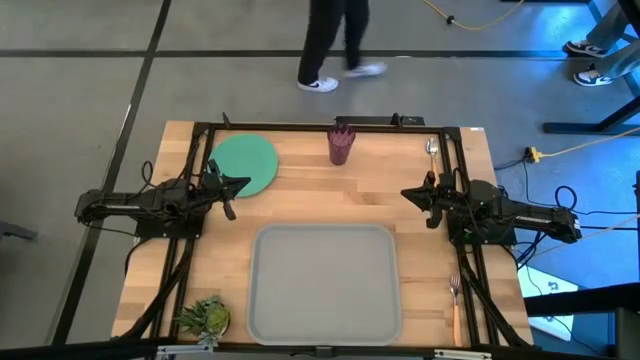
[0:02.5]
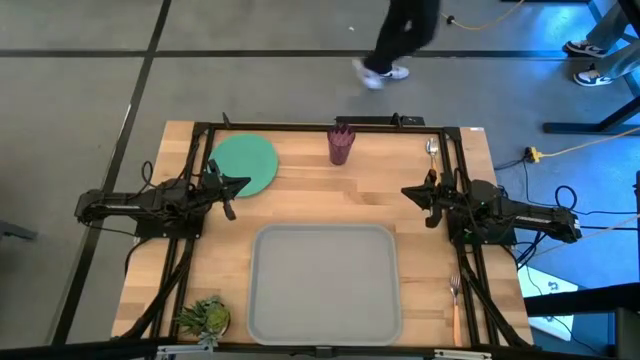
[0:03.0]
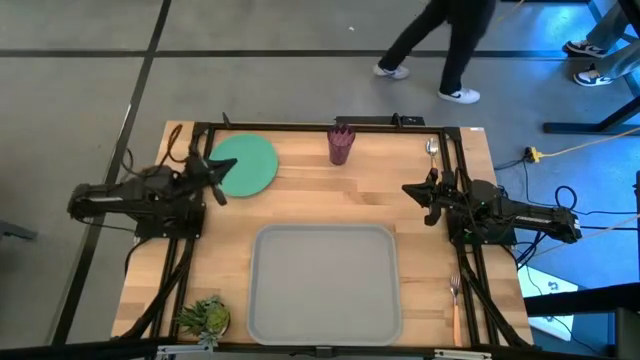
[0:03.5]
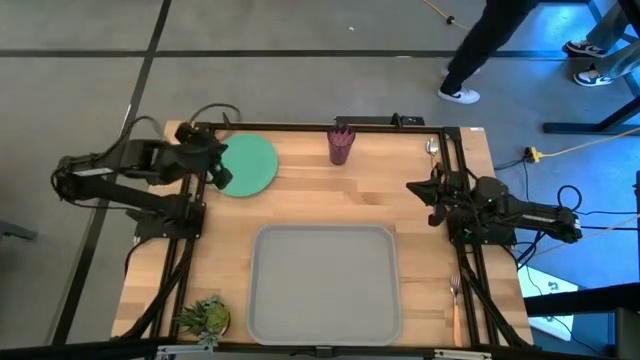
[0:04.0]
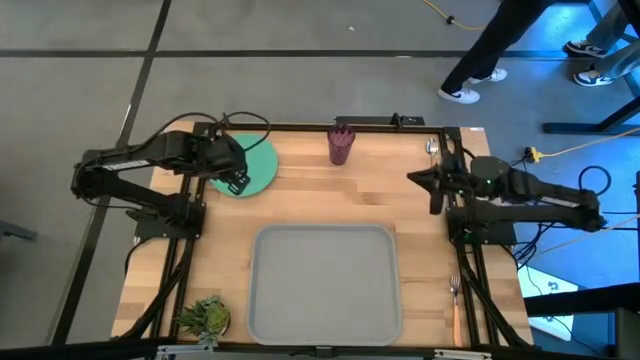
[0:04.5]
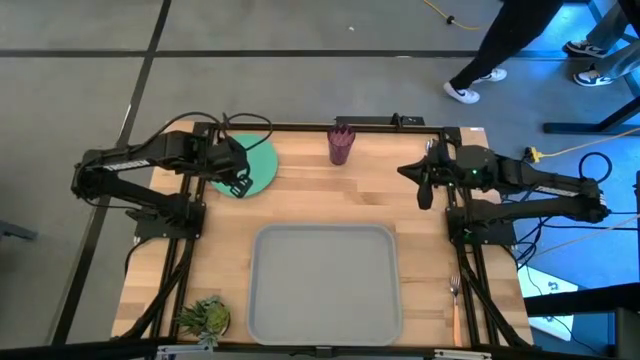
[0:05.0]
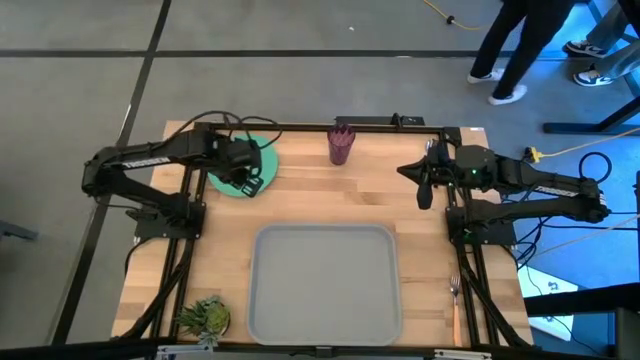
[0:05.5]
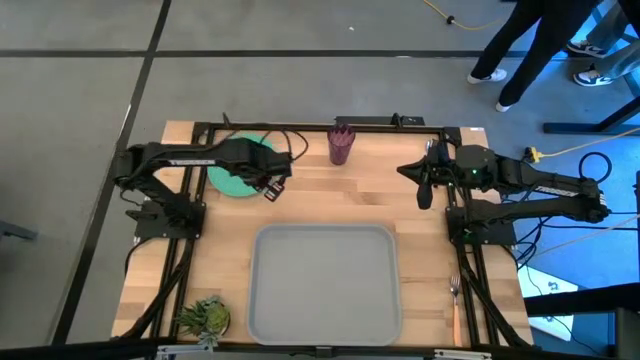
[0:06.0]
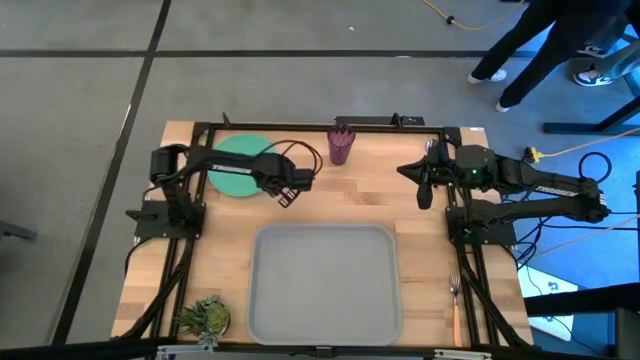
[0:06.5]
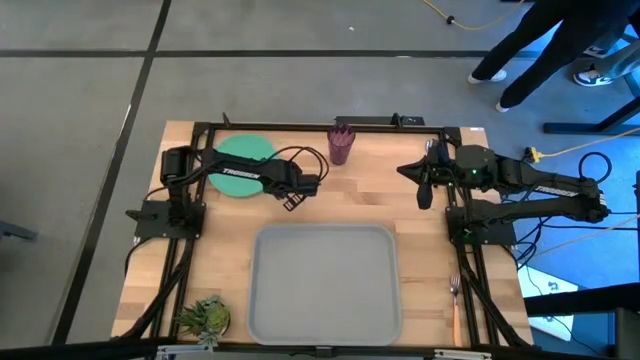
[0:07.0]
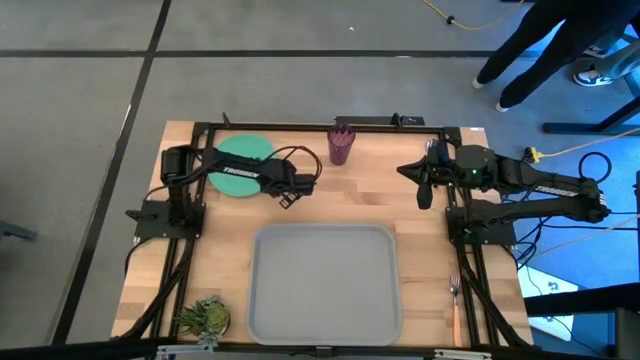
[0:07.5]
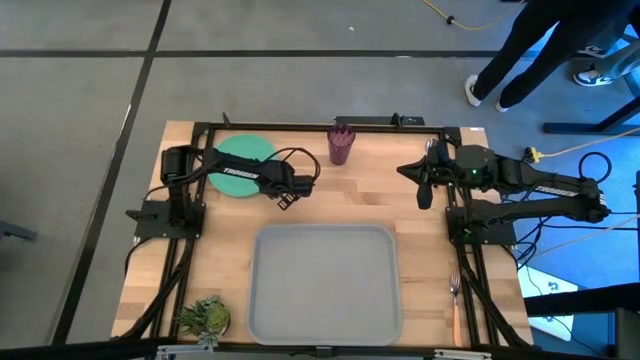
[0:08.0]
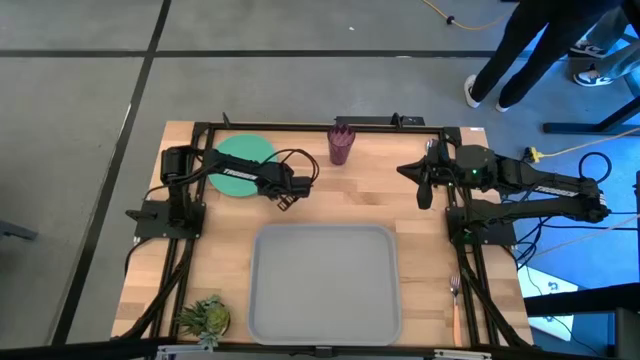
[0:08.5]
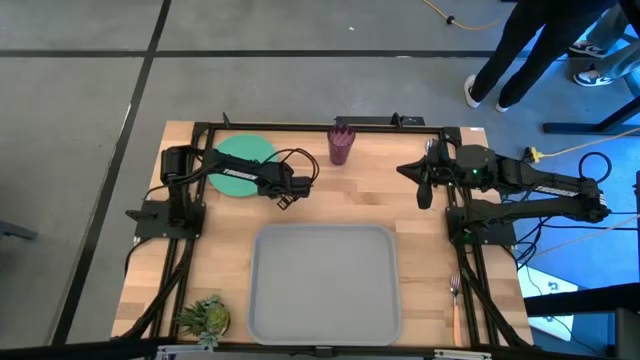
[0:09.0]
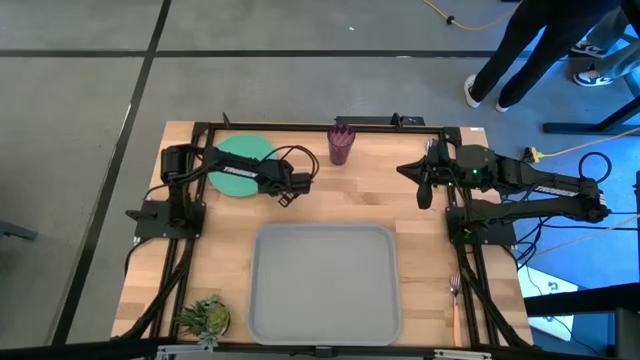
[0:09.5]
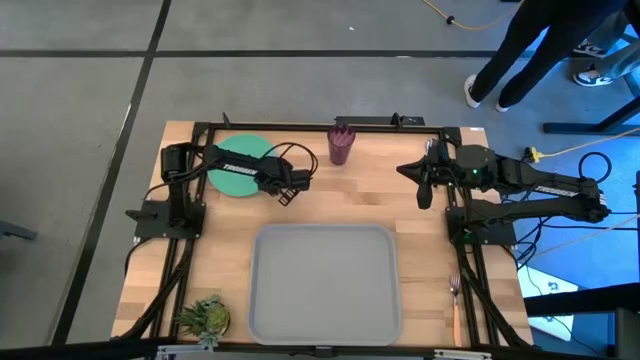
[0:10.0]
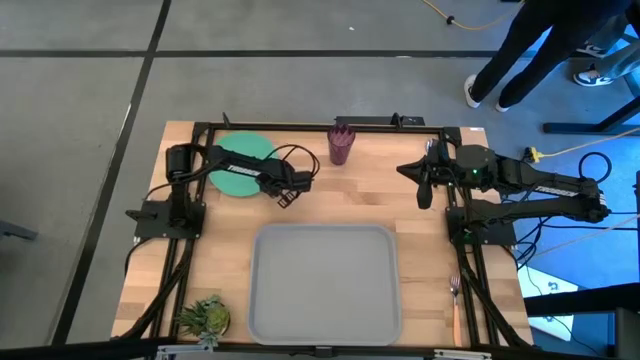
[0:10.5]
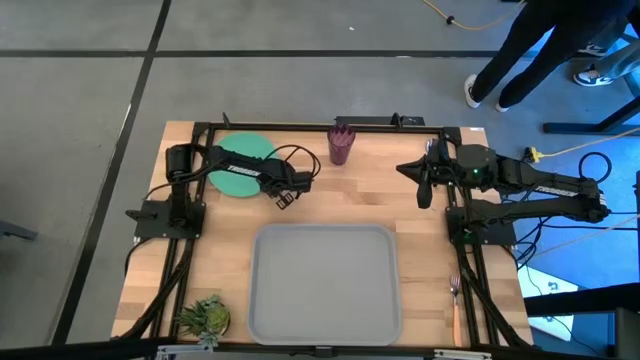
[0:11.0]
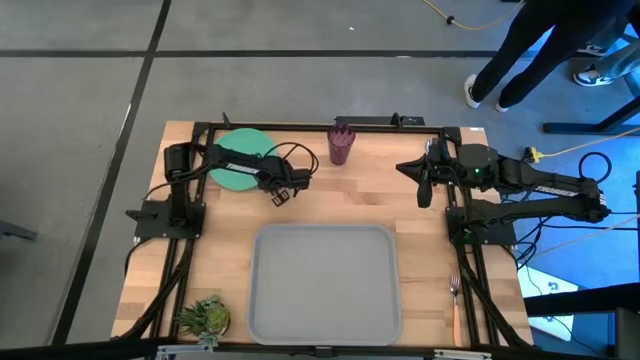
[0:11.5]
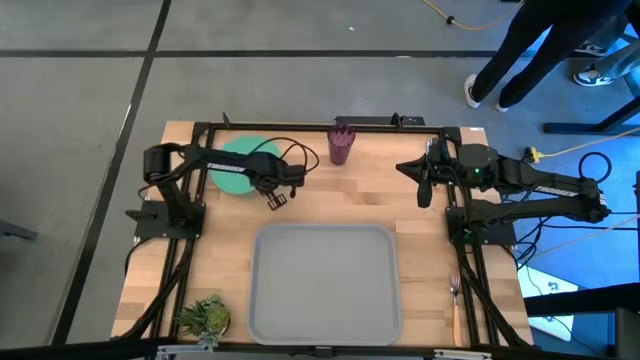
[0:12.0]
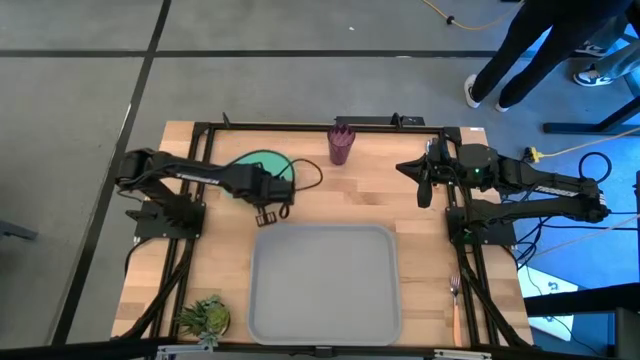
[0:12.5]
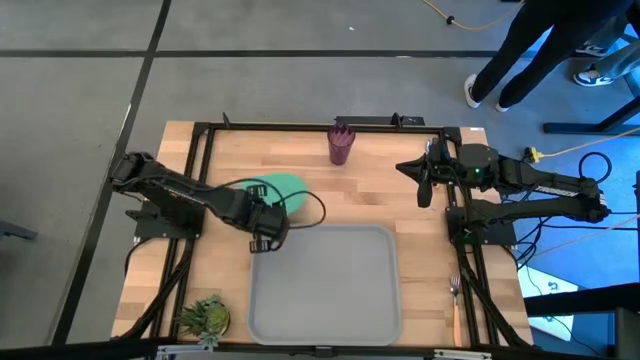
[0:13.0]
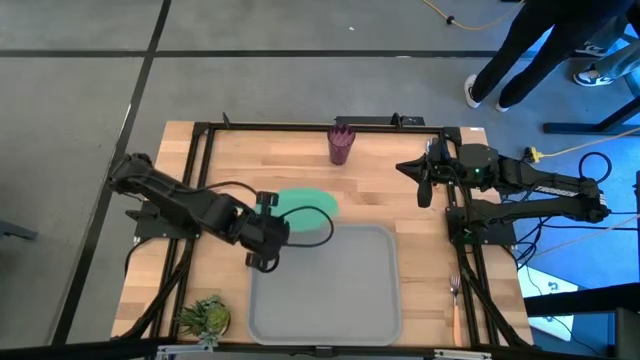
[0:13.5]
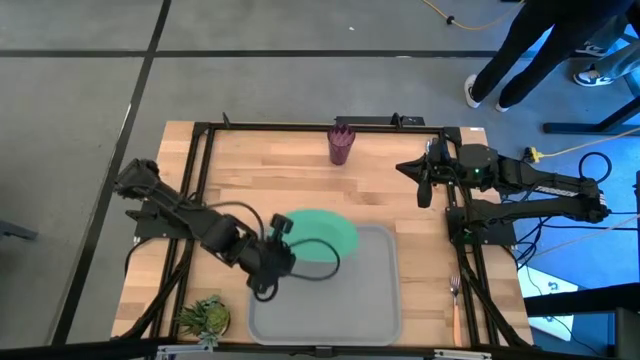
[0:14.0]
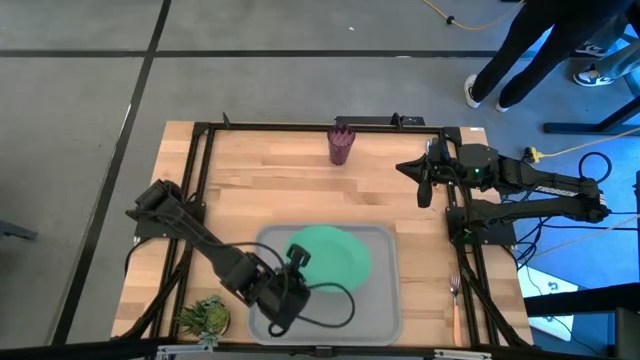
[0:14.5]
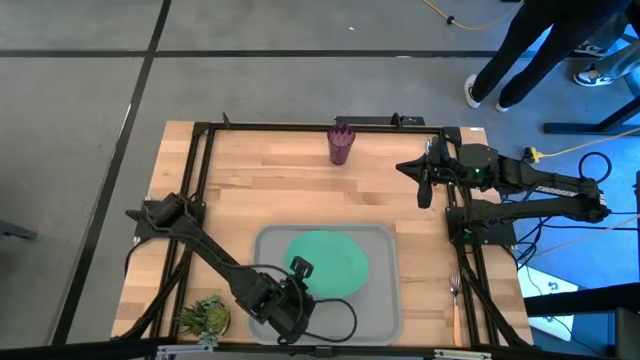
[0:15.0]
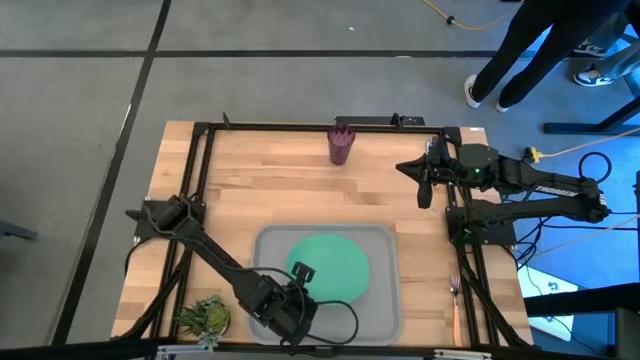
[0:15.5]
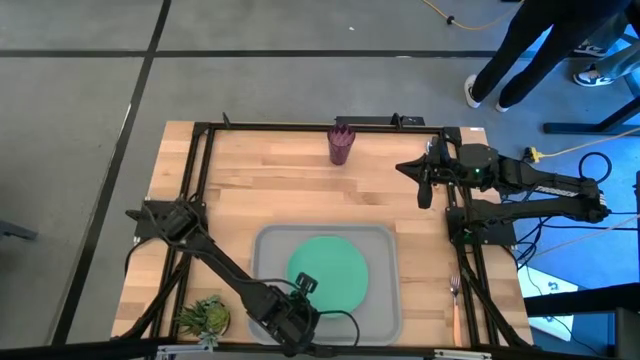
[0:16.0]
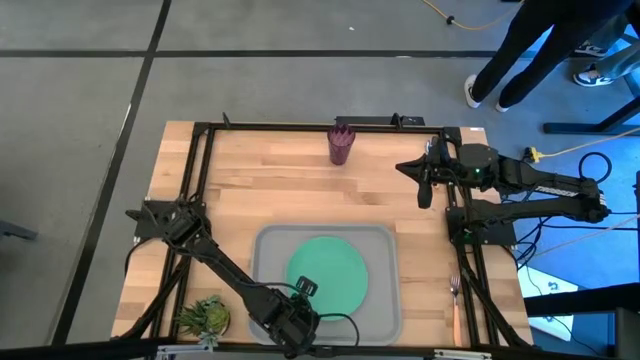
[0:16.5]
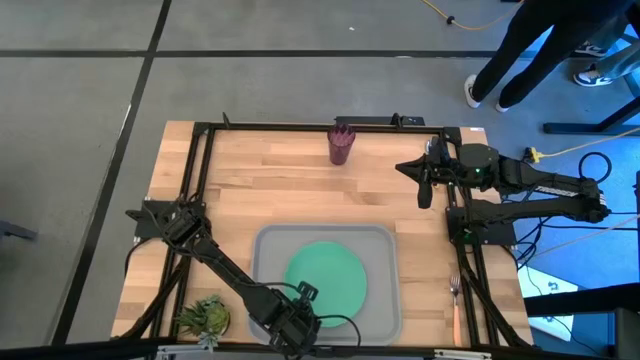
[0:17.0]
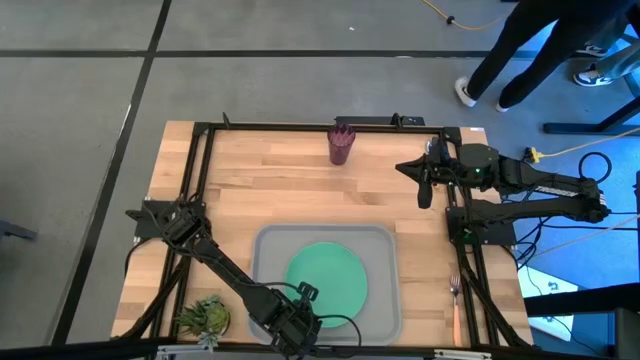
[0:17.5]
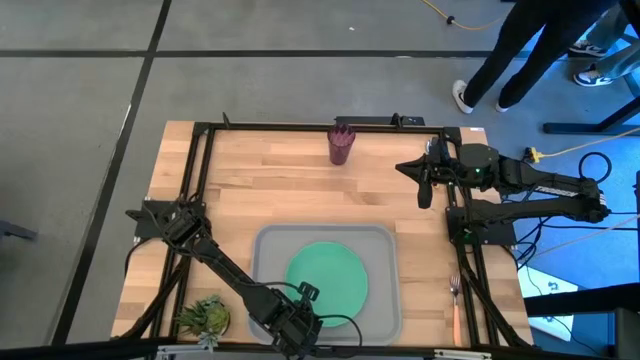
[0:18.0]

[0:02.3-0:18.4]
Task: Pick and place plate/cup/fork/spoon on tray
Put the green plate on the gray tray

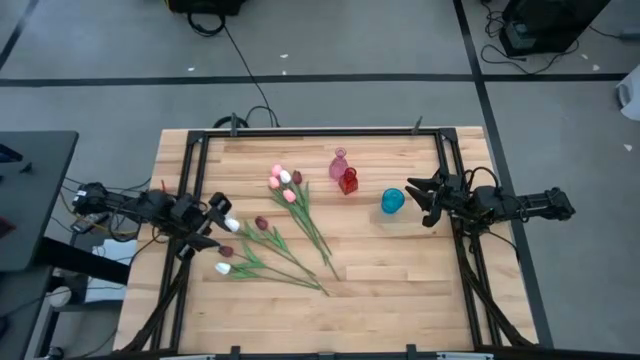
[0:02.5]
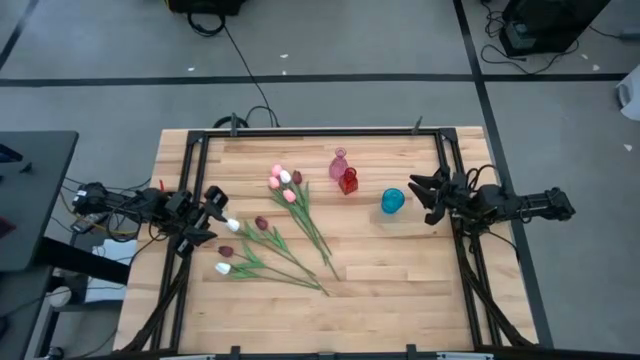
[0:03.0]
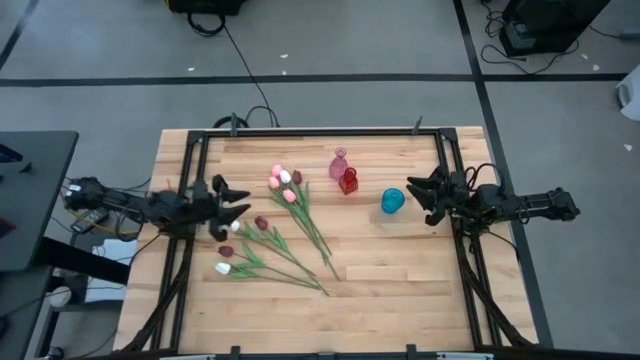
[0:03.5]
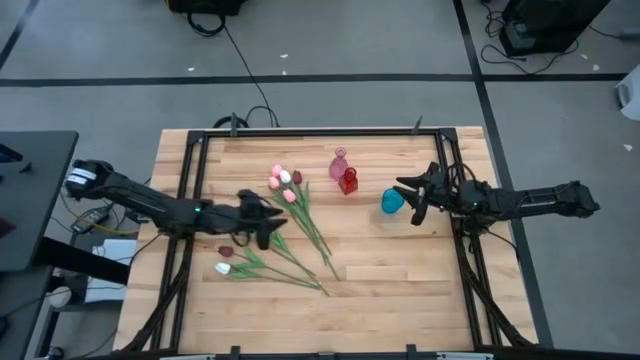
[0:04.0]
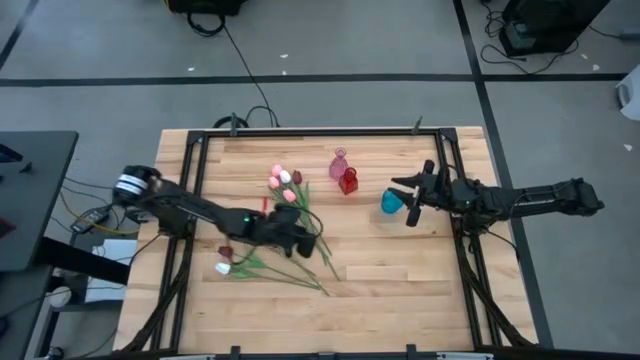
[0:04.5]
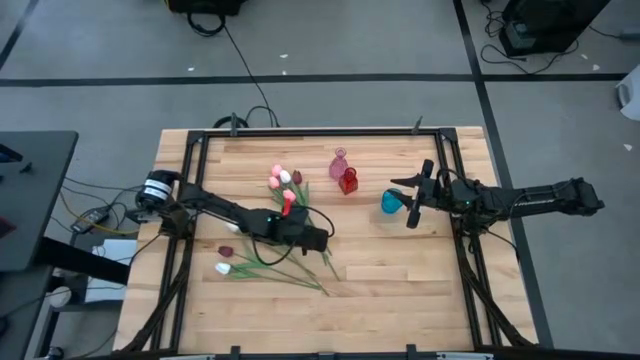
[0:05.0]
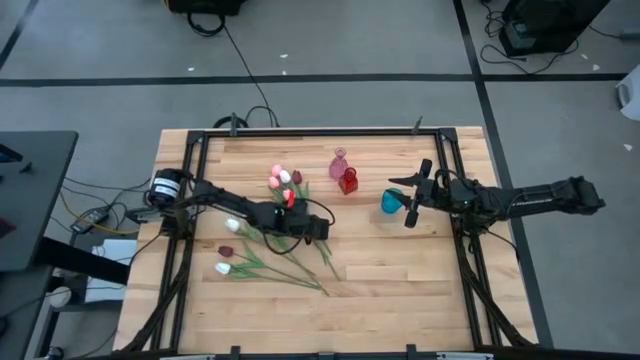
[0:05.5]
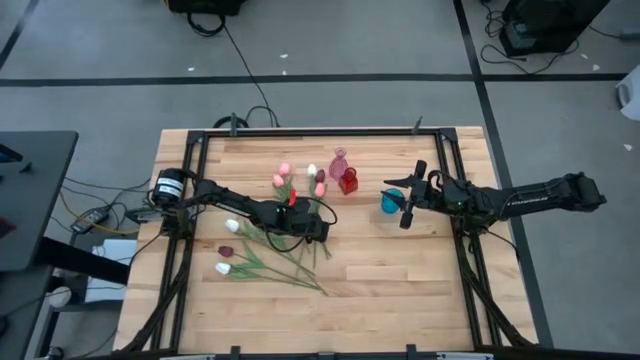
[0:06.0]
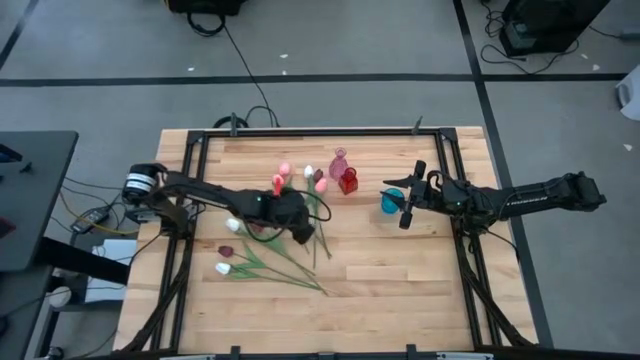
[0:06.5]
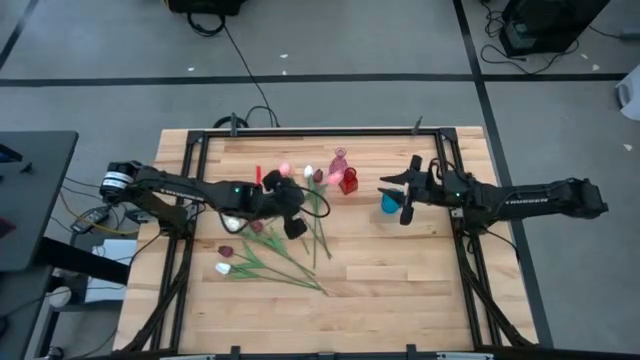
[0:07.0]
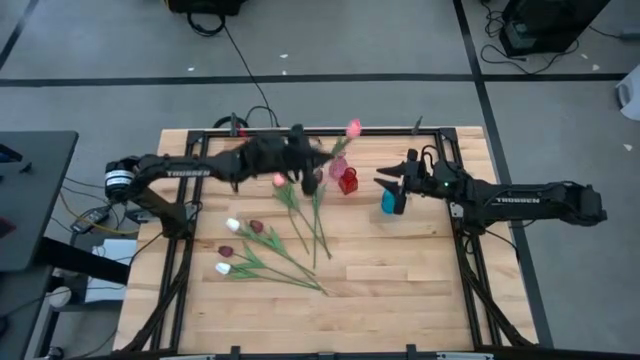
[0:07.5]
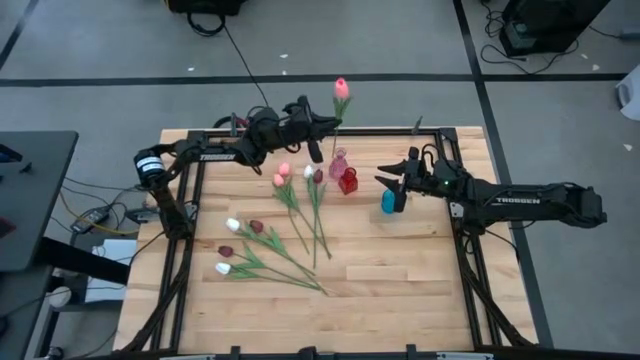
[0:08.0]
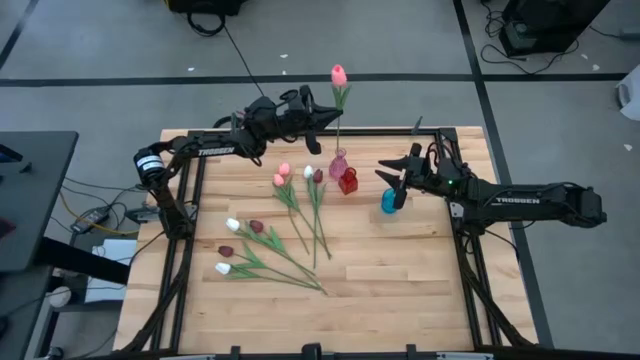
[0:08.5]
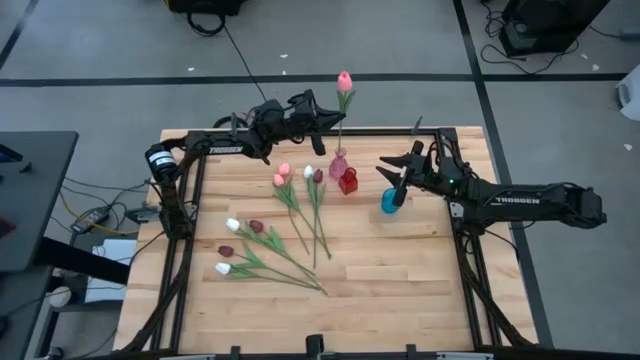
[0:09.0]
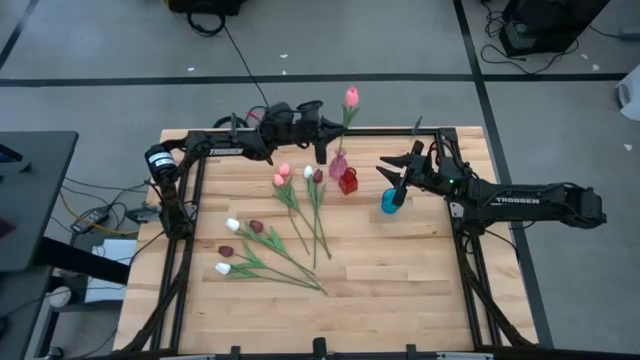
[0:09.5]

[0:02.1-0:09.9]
Task: Sort flowers into vase by color
Put the bottom pink flower into the pink vase
